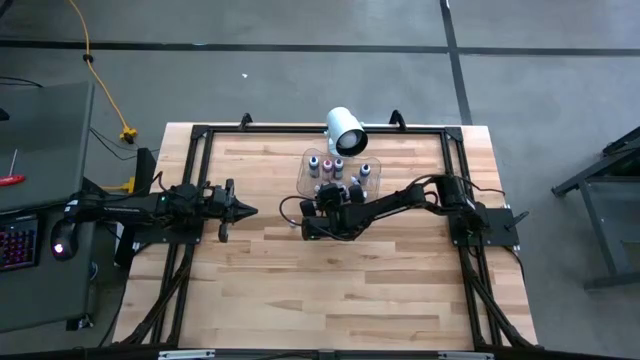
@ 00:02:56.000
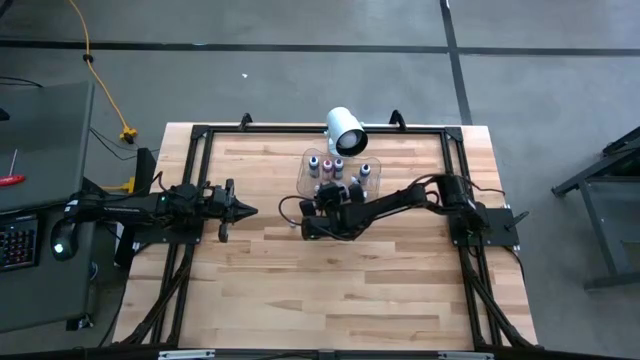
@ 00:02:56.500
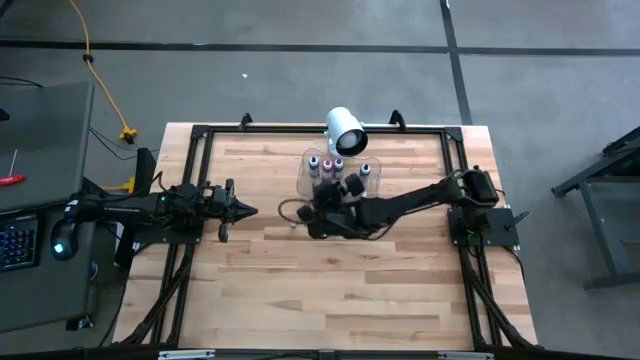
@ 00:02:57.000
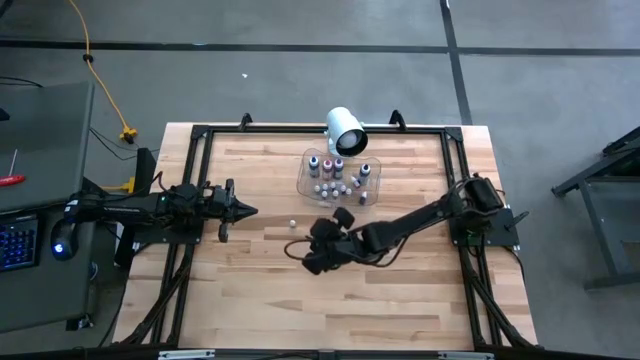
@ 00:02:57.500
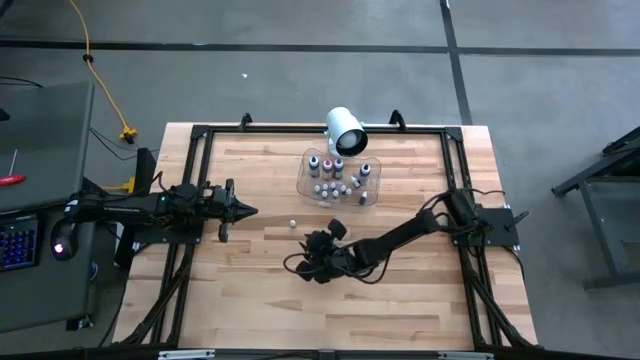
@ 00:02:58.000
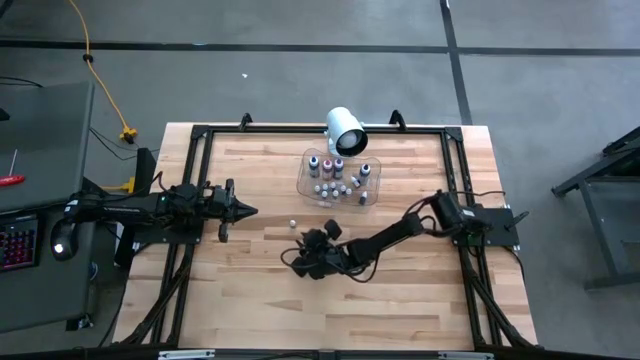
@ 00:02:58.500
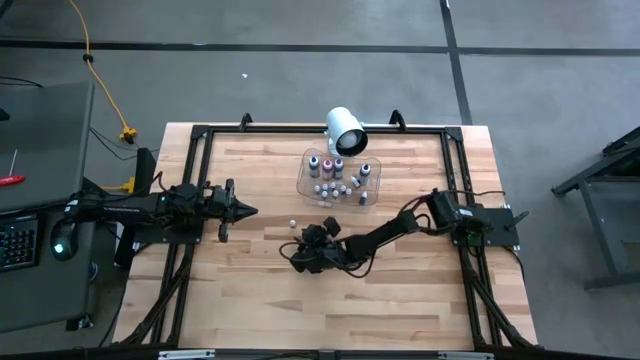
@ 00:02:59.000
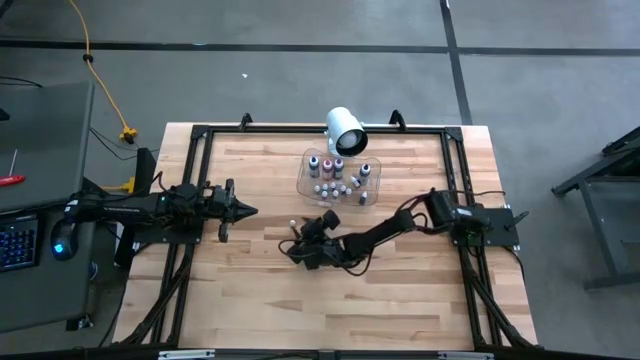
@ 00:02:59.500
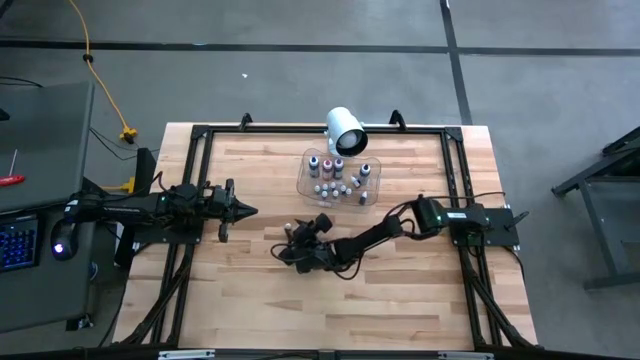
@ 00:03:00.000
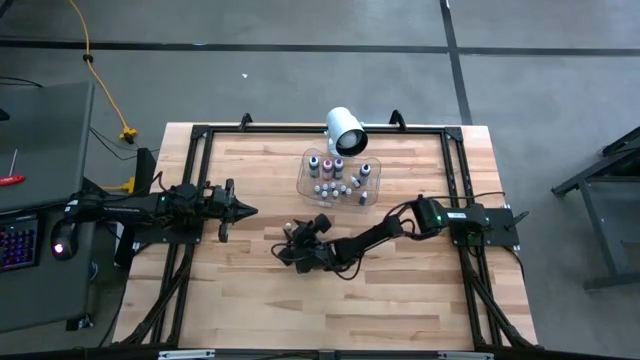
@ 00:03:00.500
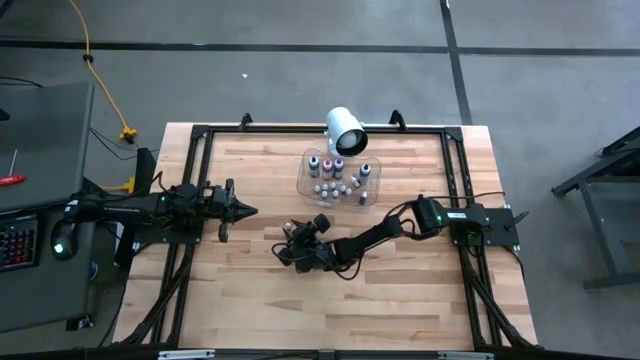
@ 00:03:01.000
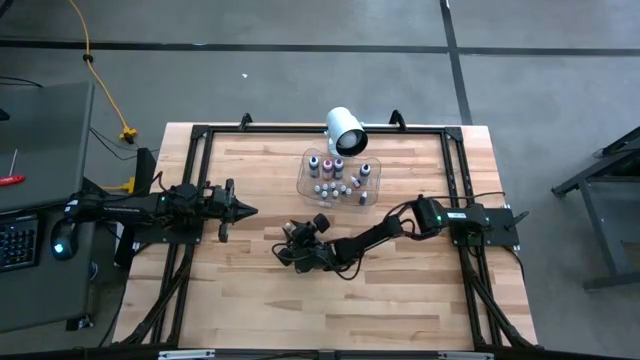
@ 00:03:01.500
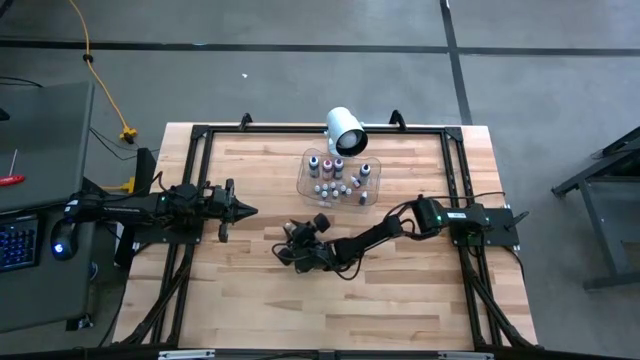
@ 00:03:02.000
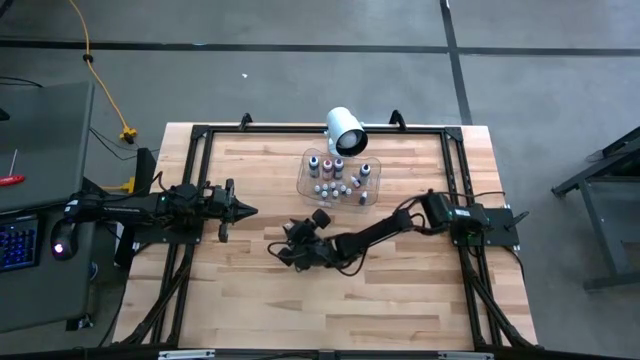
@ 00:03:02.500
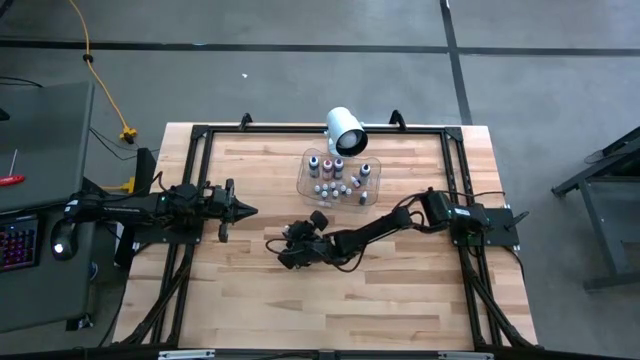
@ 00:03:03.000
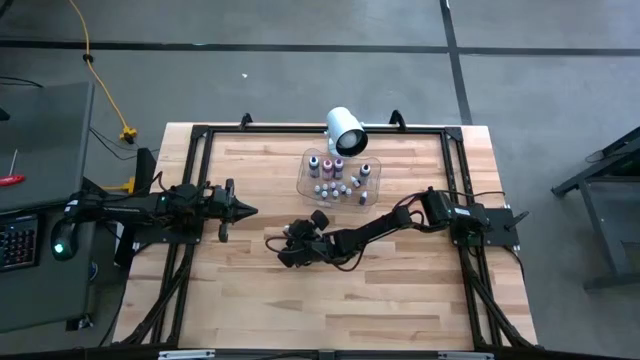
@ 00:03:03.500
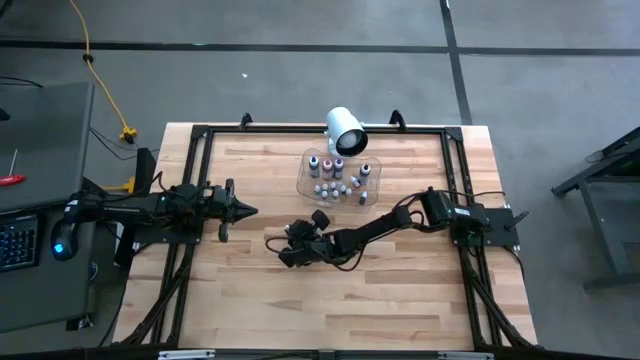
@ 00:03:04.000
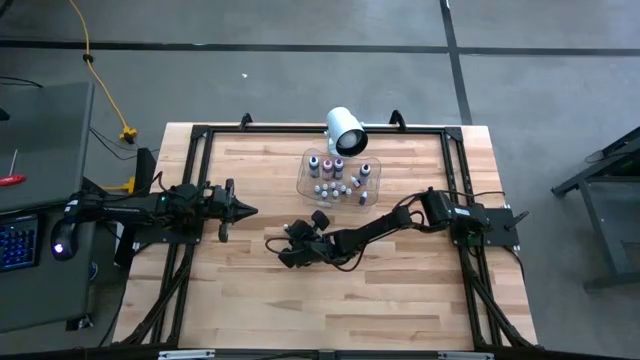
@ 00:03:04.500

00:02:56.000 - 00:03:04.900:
Task: Pick & Place food coloring
Put the small green food coloring bottle into the transparent bin

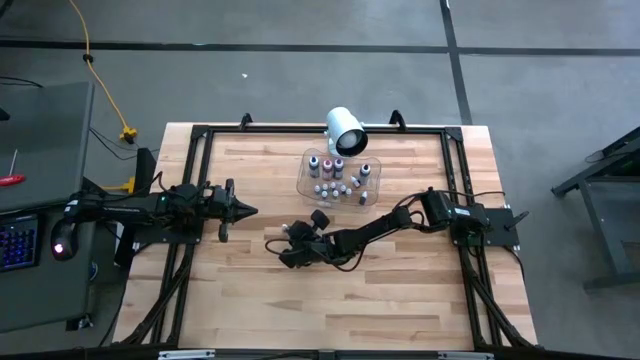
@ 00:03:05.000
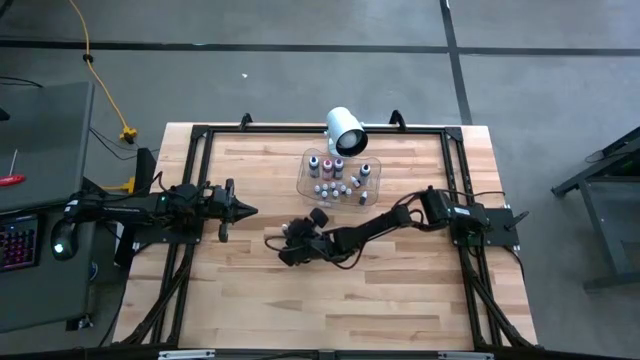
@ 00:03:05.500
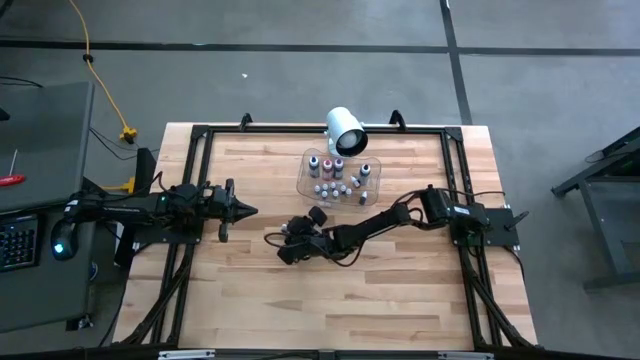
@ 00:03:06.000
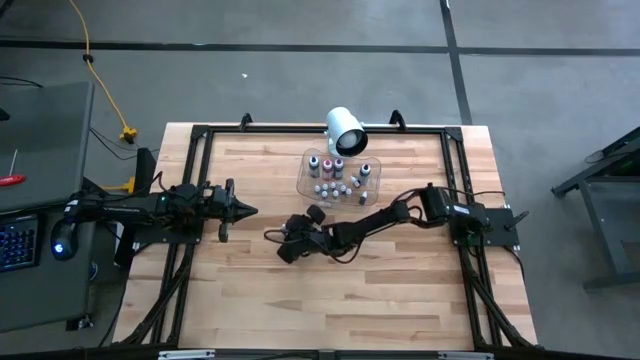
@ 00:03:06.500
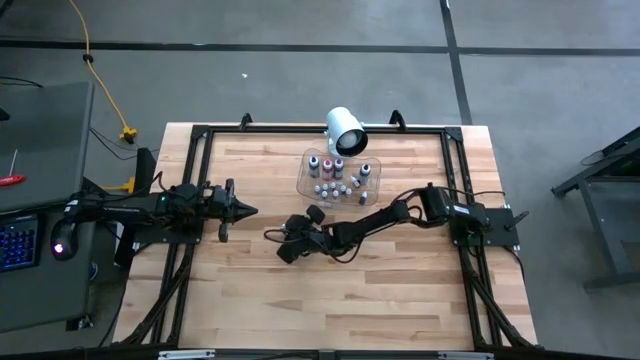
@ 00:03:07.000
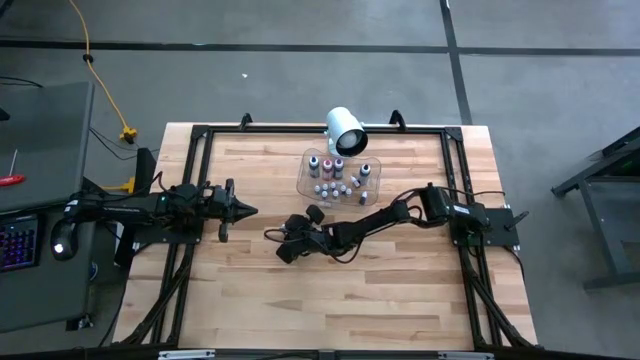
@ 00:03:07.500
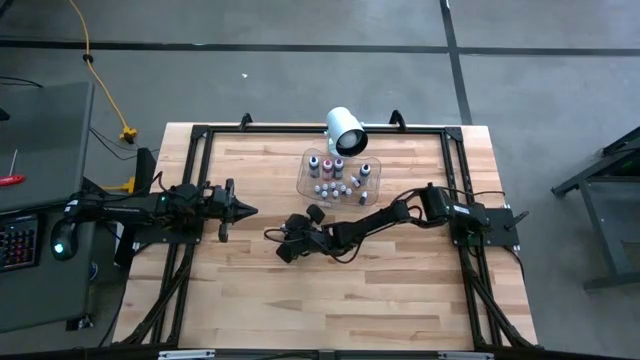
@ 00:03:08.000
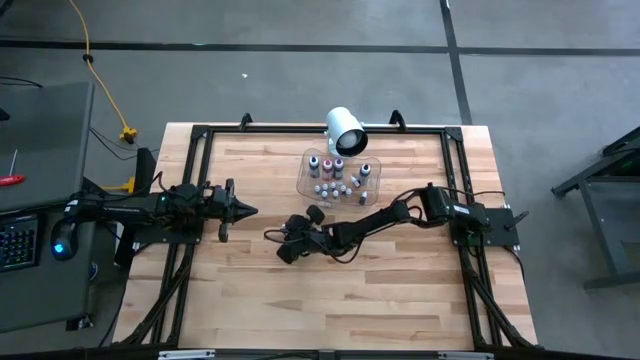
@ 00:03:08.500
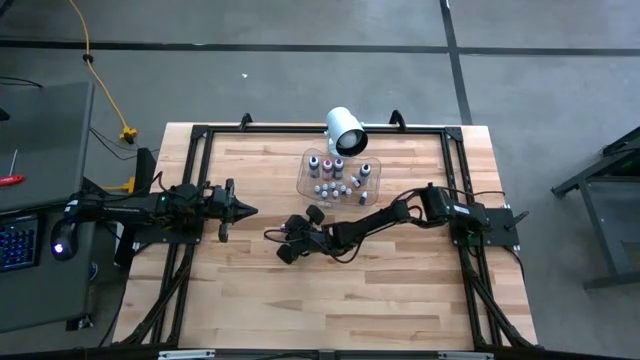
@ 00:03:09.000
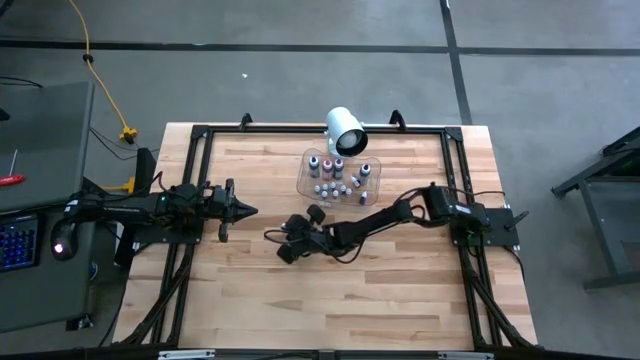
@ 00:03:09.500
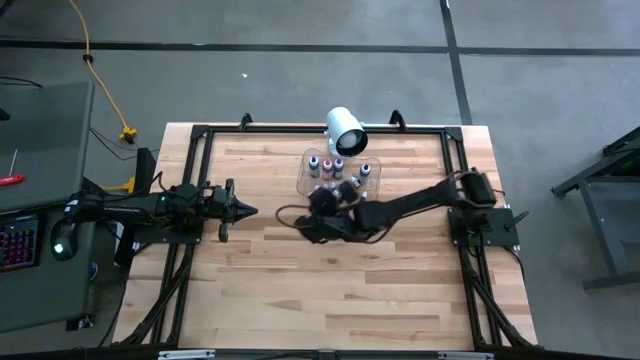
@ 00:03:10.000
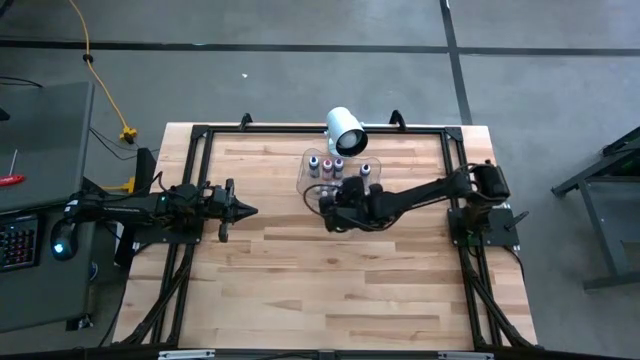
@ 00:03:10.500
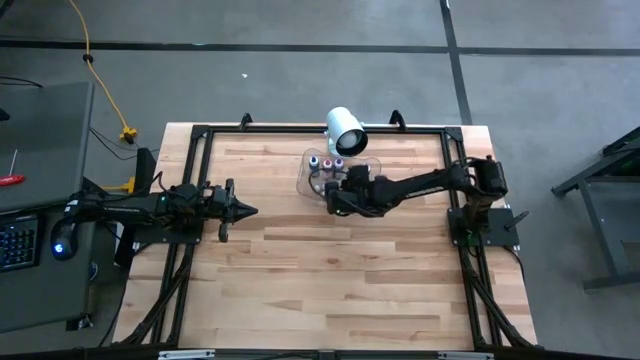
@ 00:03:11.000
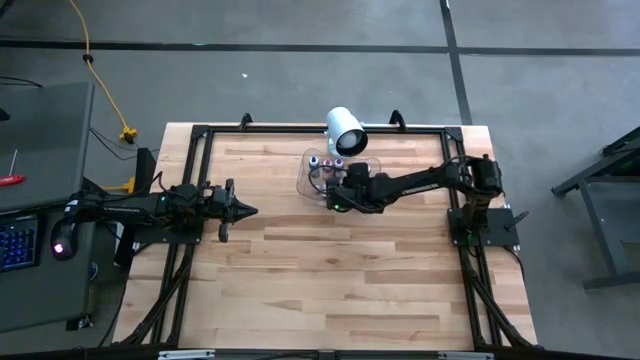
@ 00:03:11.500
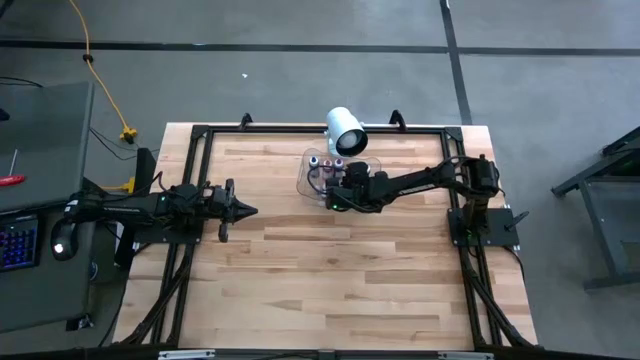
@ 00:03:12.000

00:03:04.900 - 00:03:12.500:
Put the small green food coloring bottle into the transparent bin

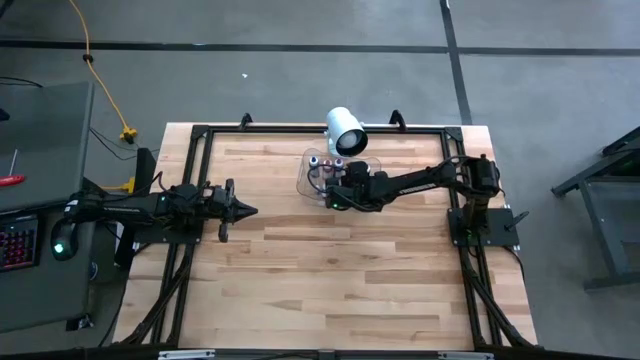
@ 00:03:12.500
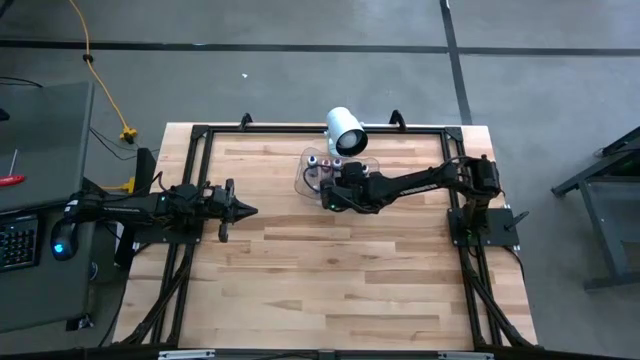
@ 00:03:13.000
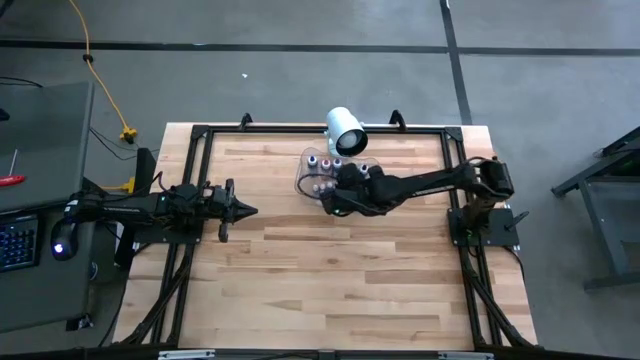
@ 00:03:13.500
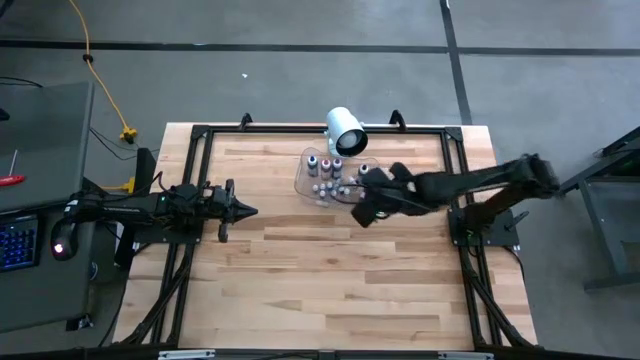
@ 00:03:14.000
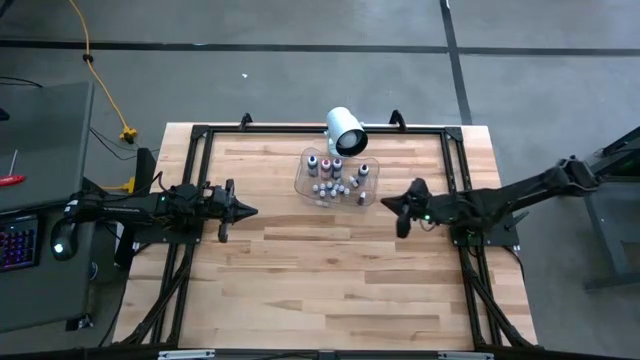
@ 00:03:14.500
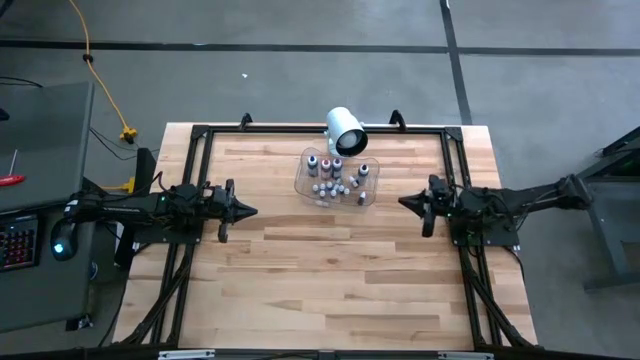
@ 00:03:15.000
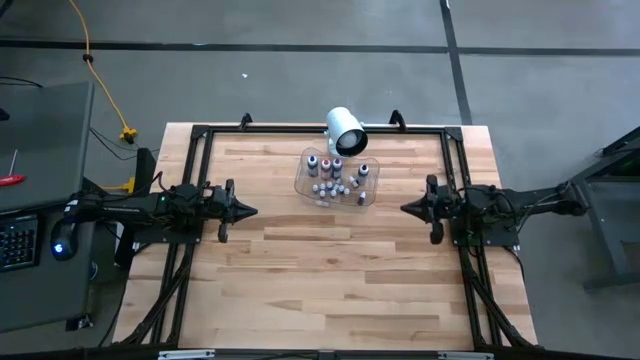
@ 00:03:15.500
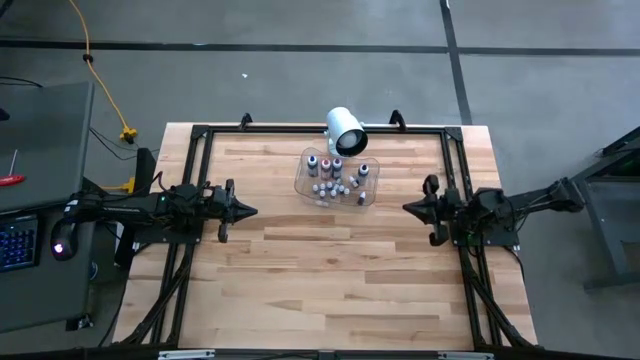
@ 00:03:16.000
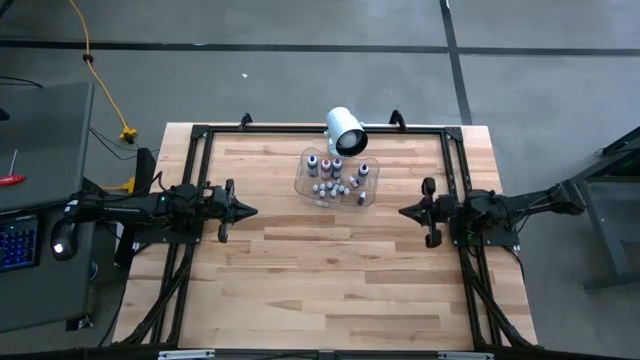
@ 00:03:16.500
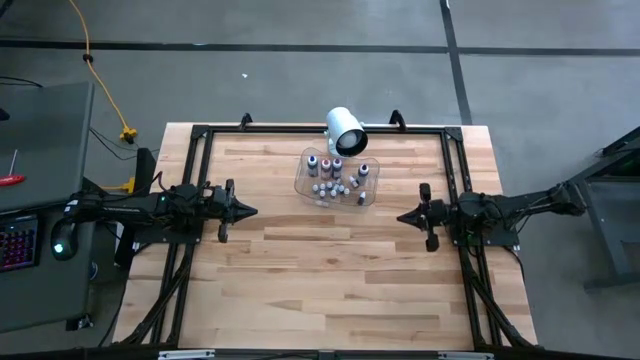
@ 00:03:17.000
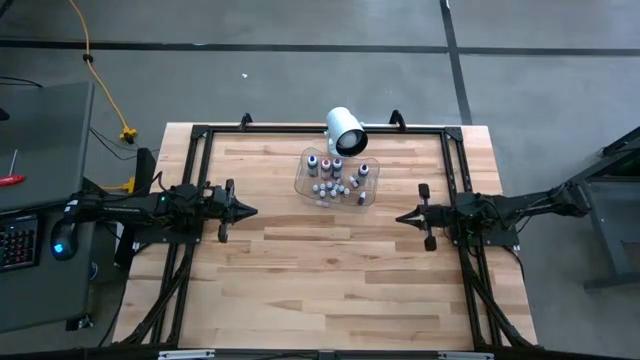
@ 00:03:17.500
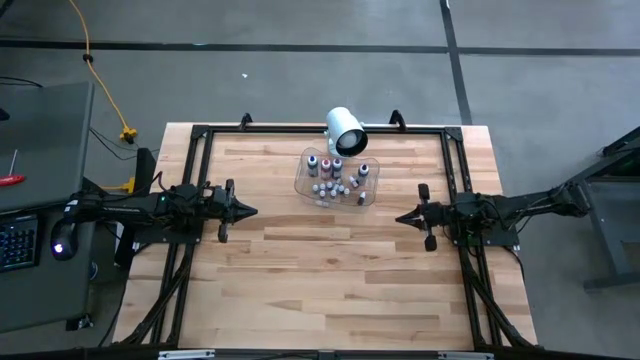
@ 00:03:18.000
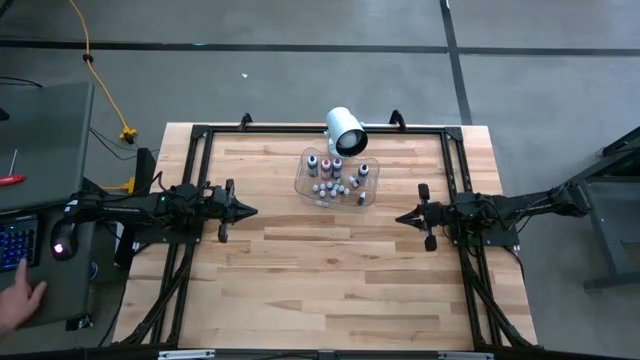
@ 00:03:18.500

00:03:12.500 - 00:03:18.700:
Return to Home Position
